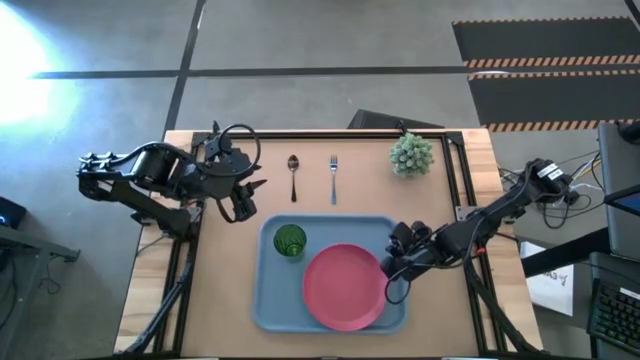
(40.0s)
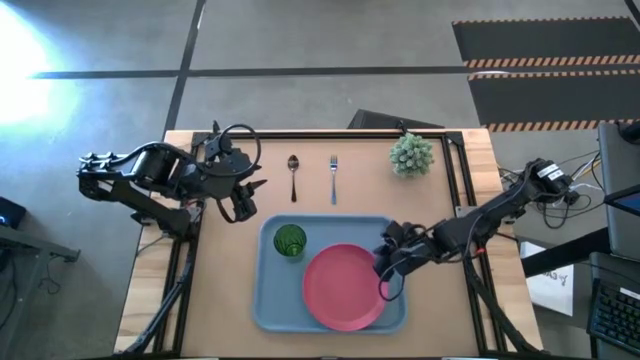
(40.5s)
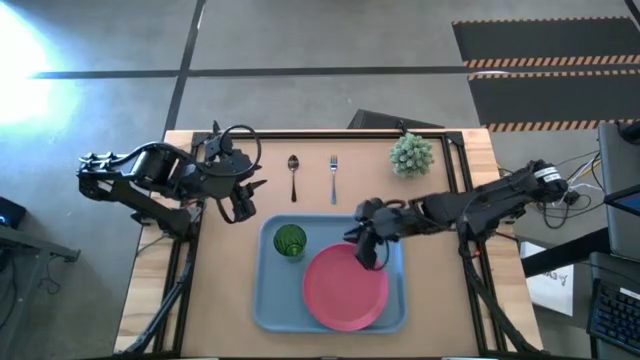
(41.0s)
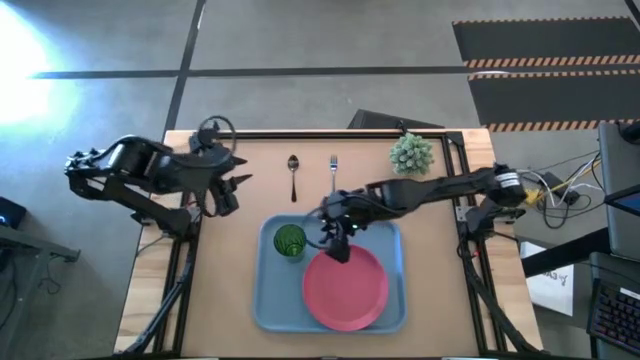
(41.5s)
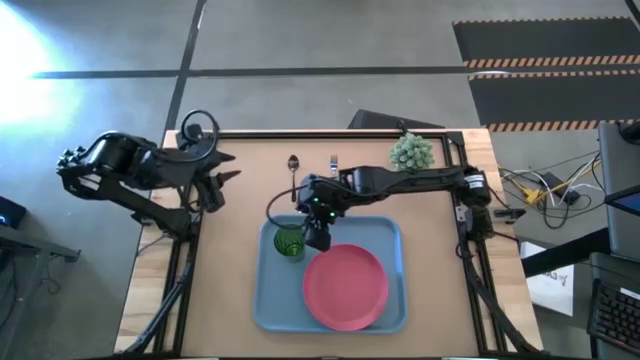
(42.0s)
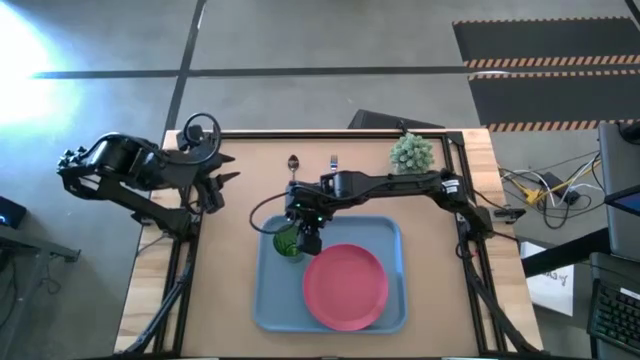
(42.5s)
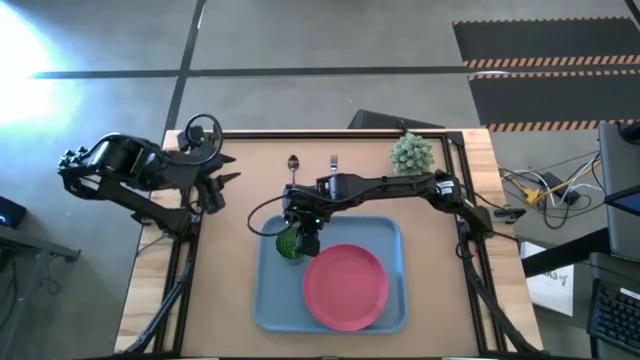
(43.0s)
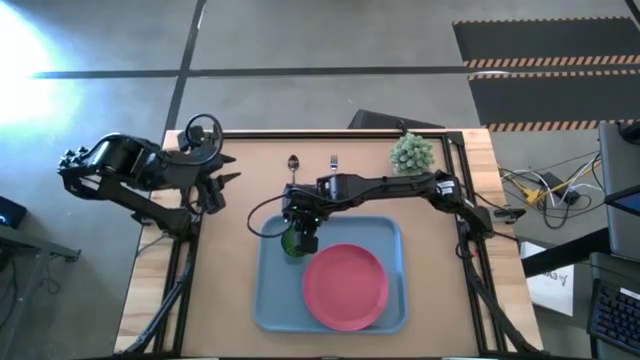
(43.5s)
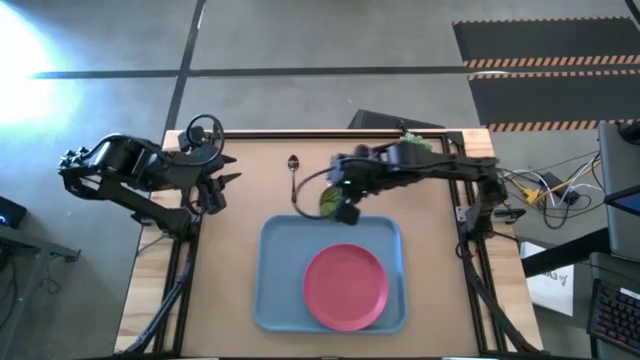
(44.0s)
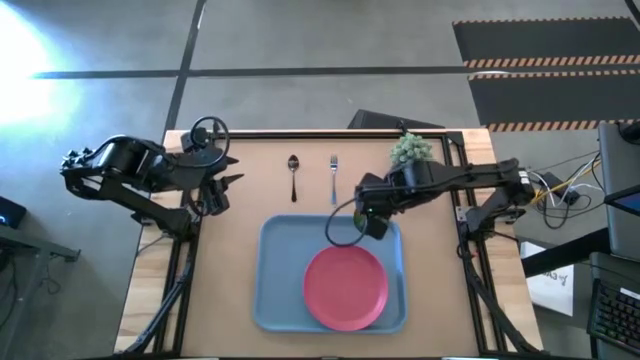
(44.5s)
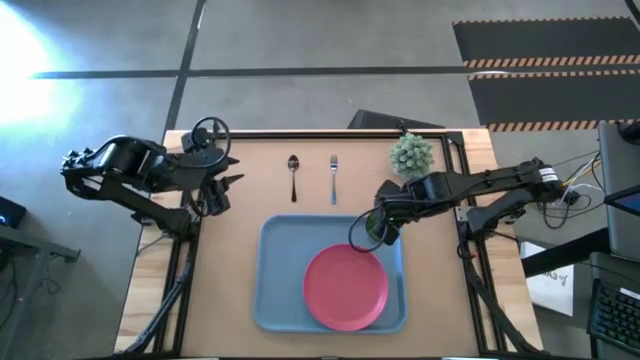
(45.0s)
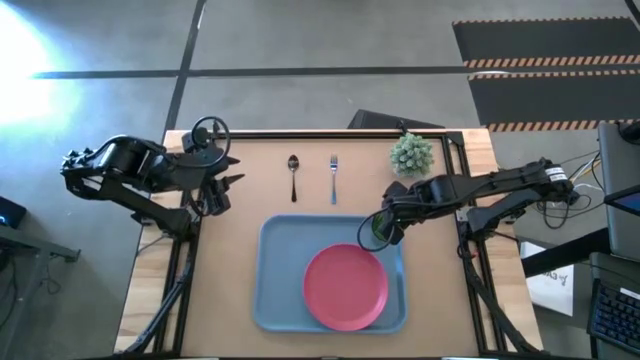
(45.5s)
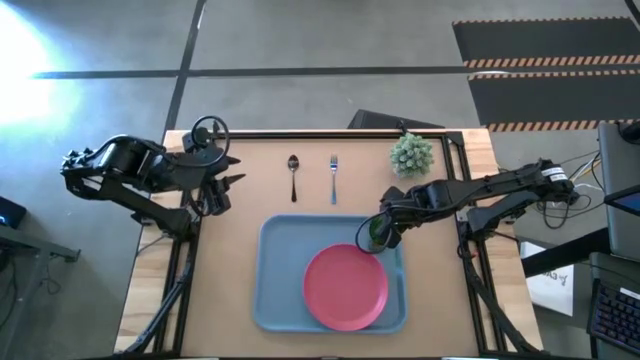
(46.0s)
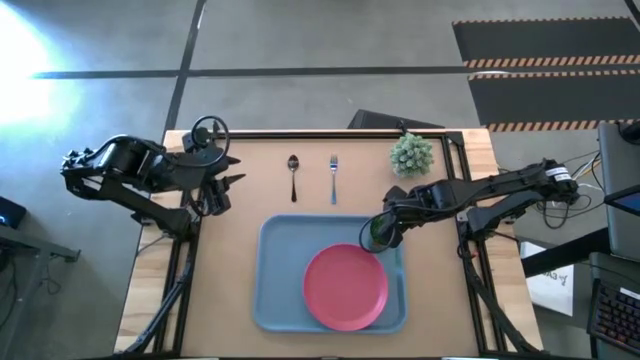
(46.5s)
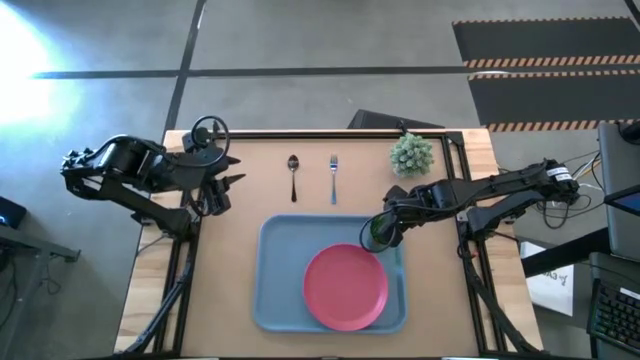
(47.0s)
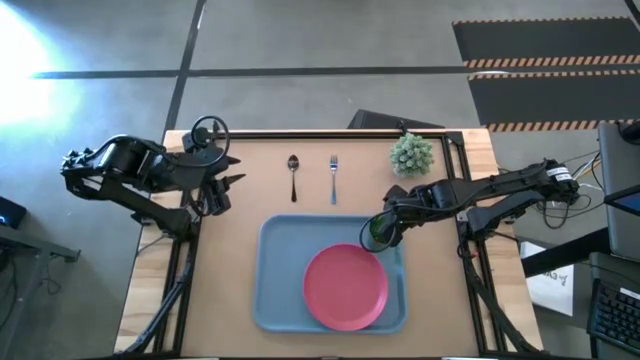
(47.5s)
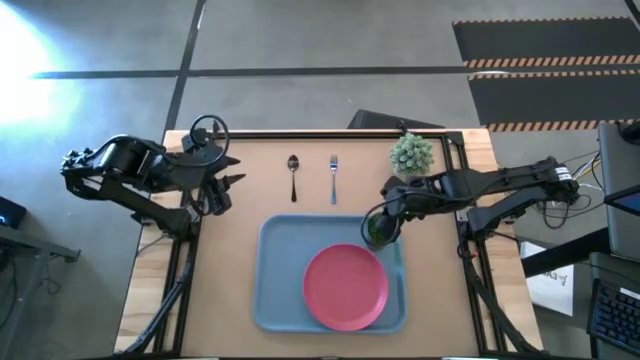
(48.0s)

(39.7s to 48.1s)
Task: Pick and place plate/cup/fork/spoon on tray
Move the green cup to the top left of the pink plate

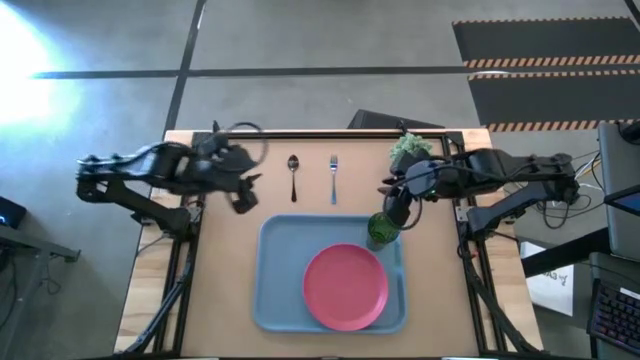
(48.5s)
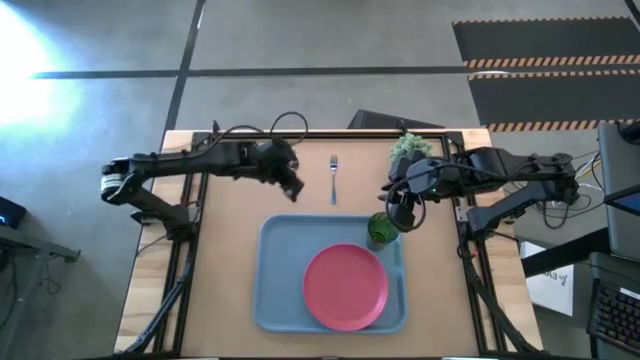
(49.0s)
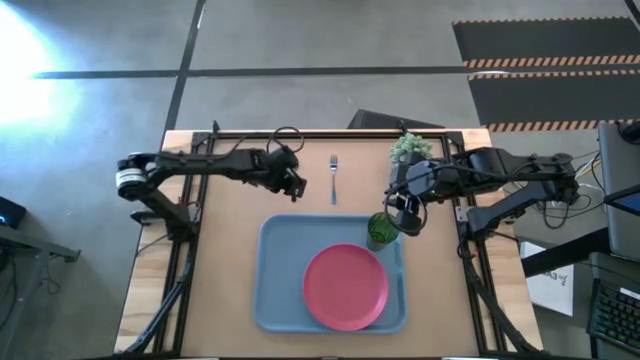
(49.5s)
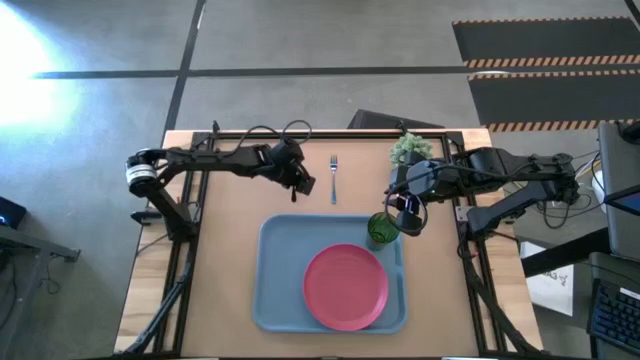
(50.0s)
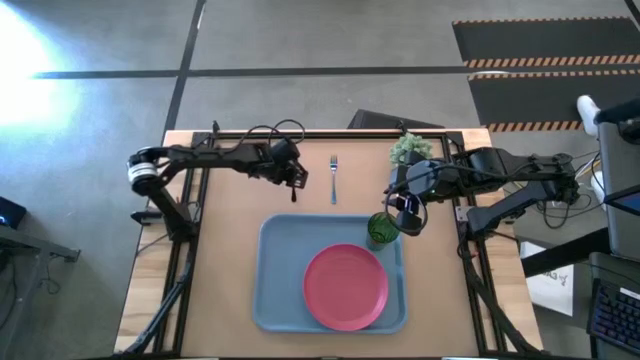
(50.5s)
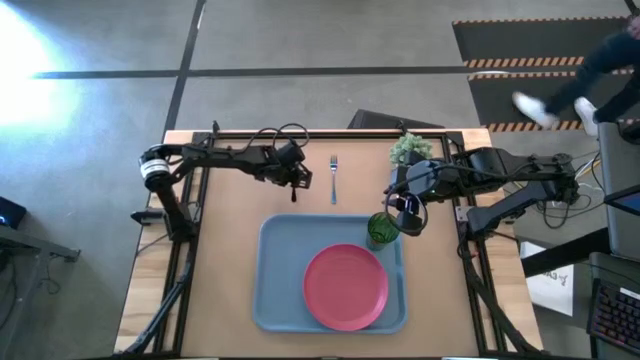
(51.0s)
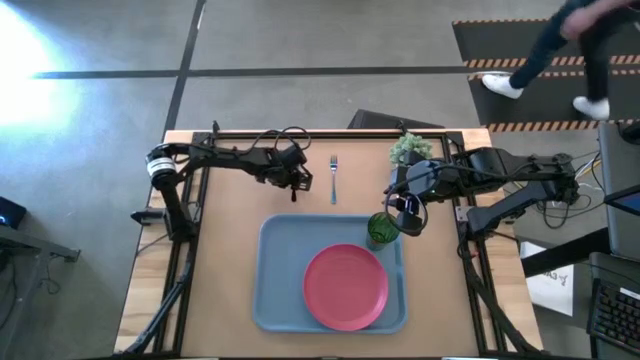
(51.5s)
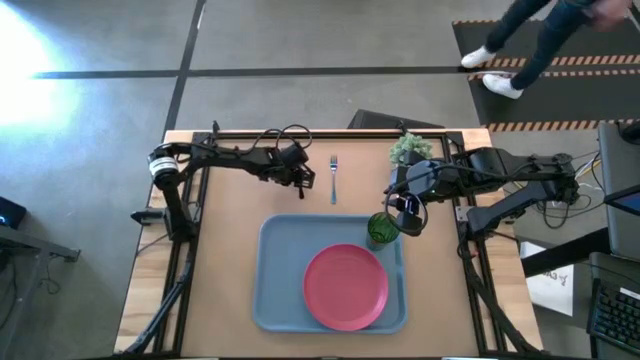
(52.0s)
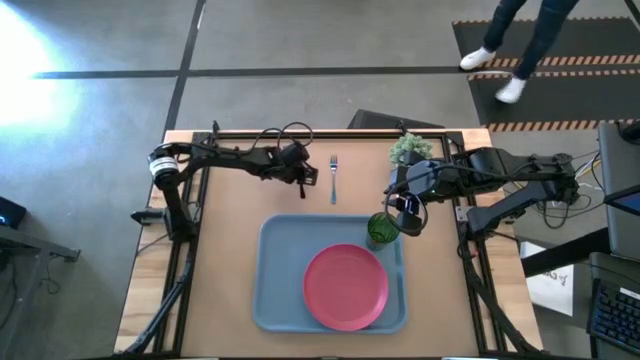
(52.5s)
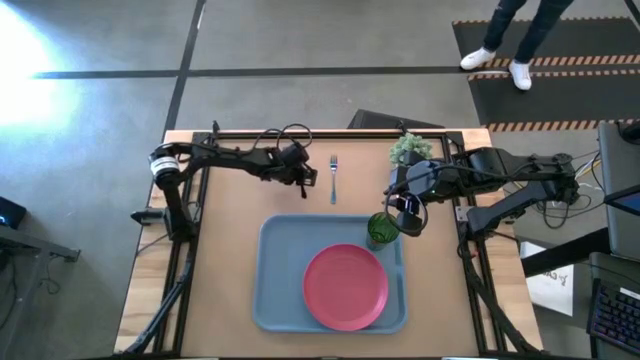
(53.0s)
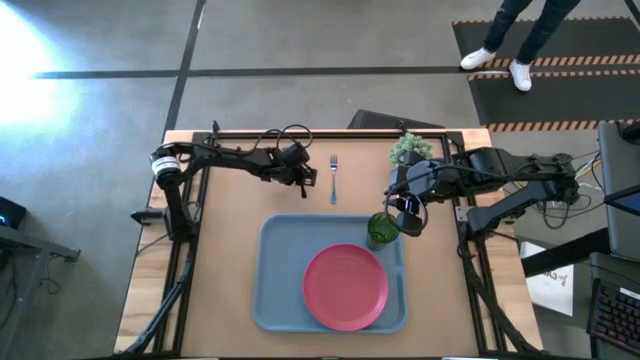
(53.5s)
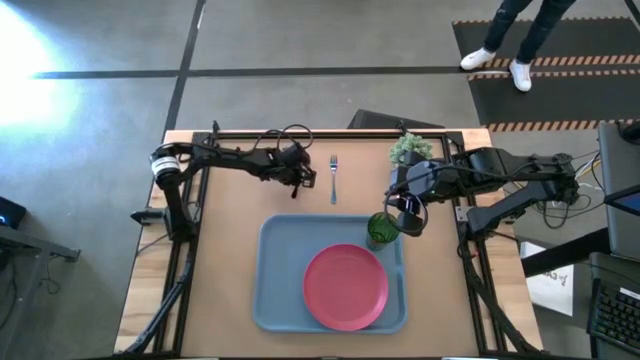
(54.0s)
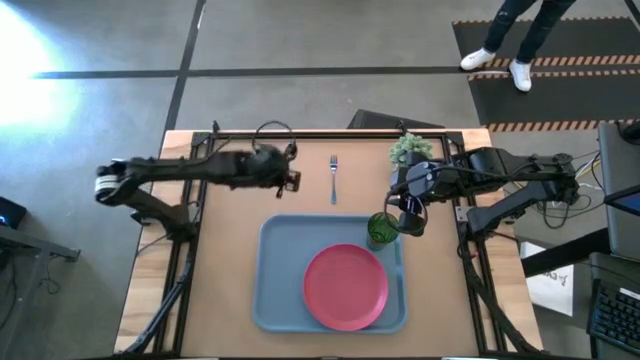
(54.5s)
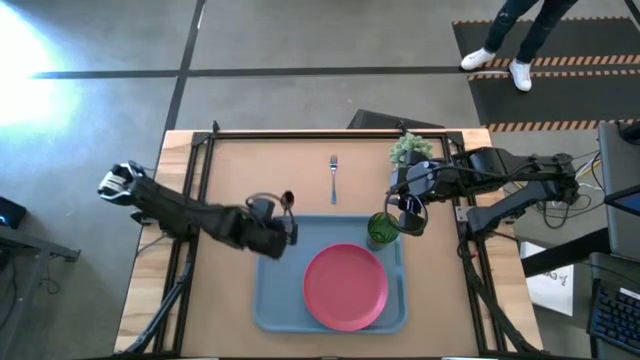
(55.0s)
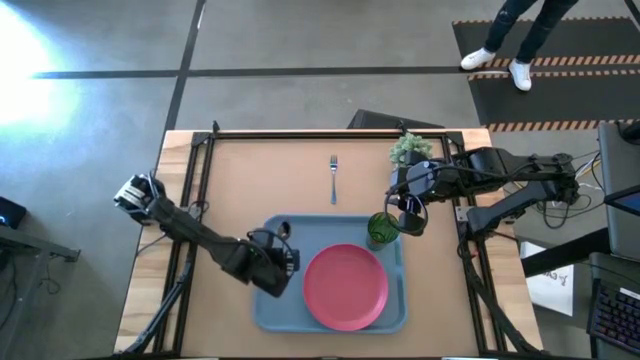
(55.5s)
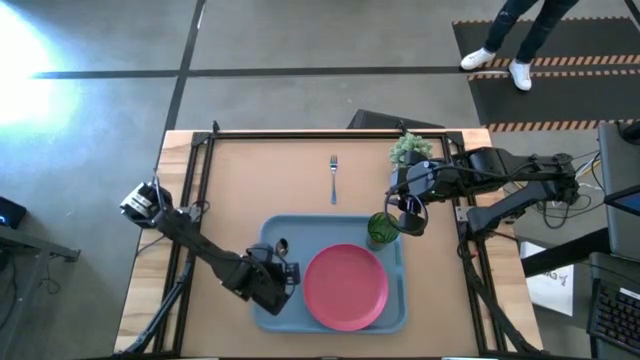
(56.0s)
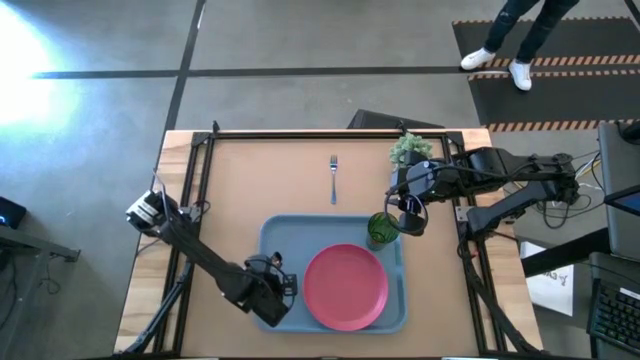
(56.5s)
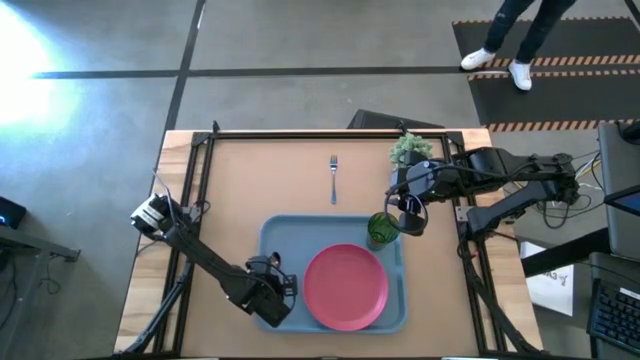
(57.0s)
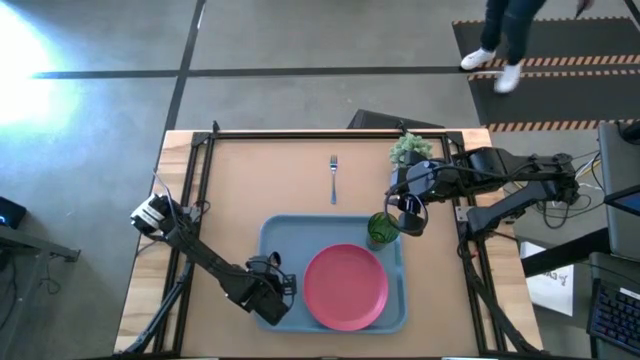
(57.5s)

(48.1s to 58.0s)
Put the black spoon on the blue tray to the left of the pink plate

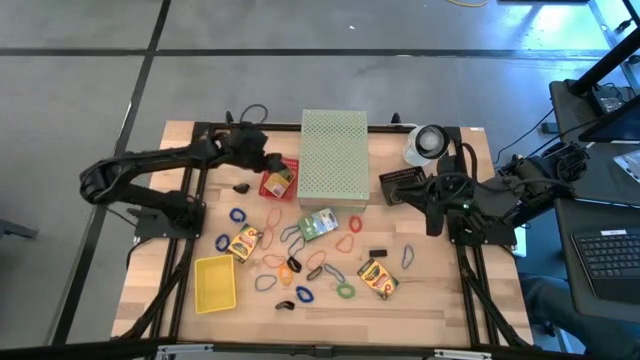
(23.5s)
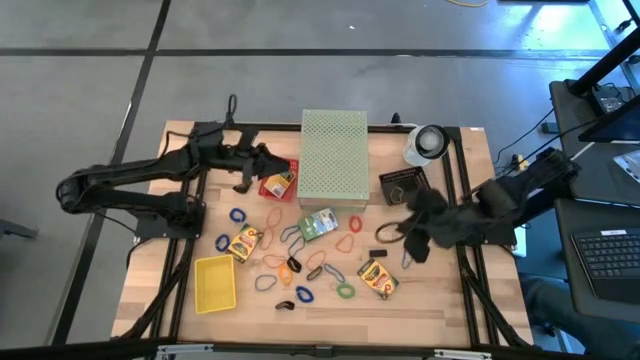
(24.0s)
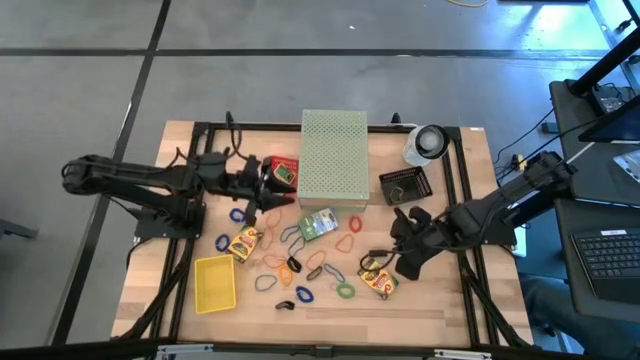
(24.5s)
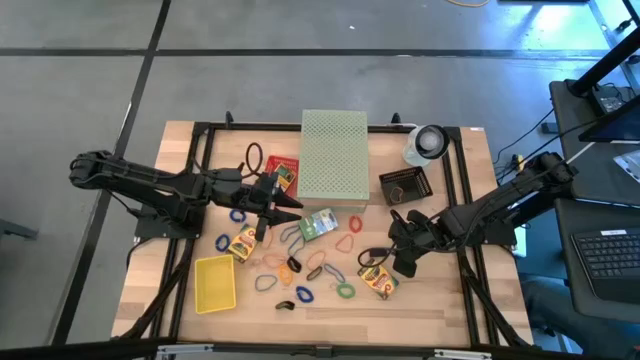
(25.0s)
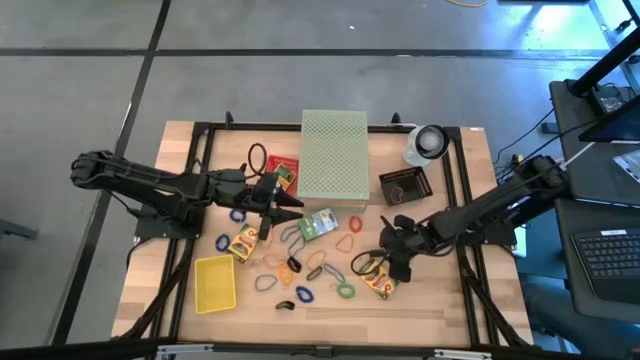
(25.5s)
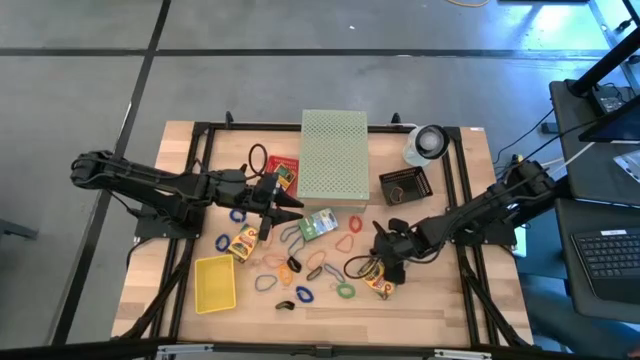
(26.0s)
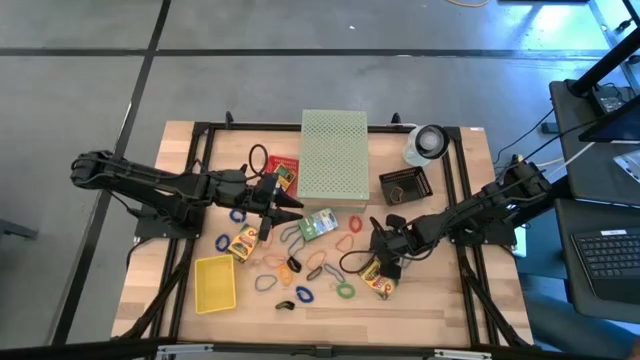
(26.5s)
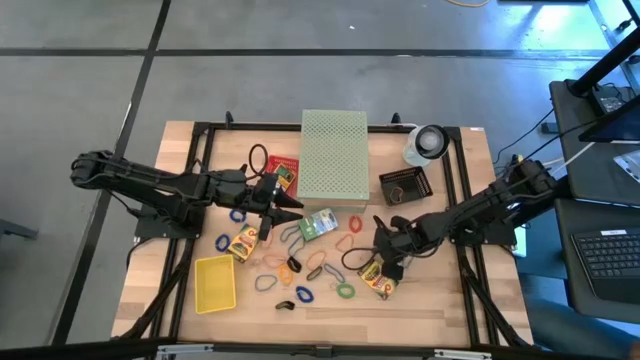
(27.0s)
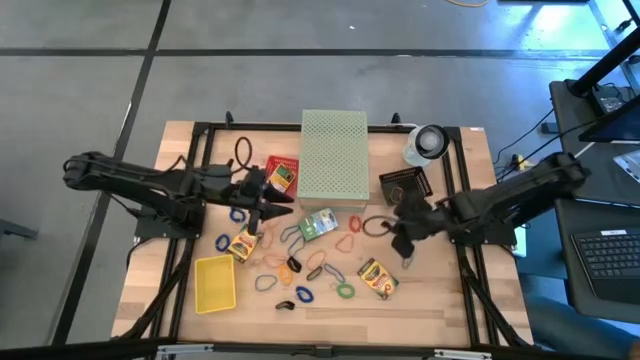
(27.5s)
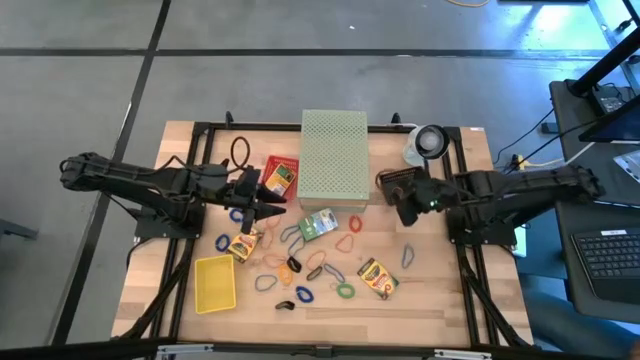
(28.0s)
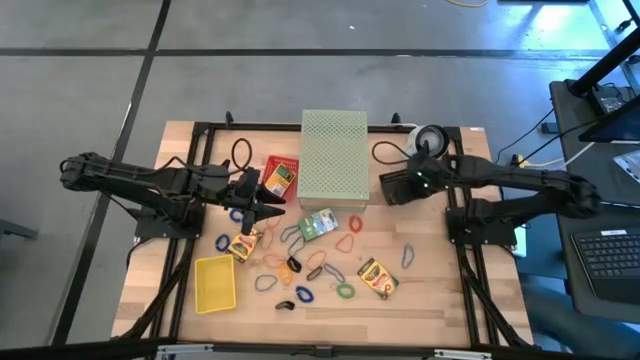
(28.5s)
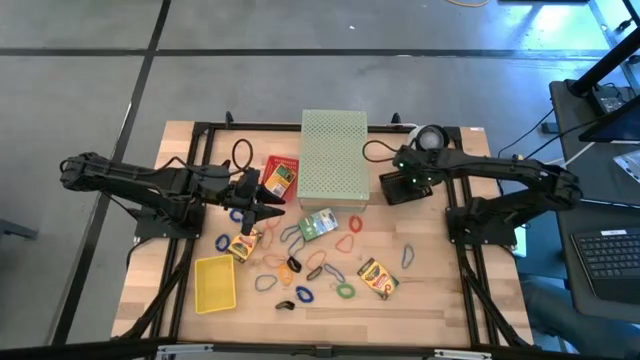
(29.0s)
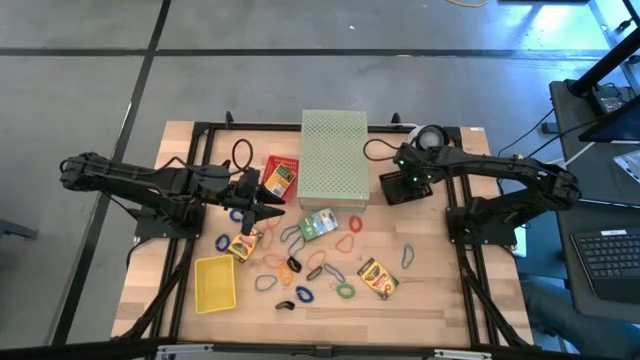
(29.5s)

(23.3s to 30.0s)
Task: Pick & Place Office Desk Supplies
Put the black rubber band into the black bin
